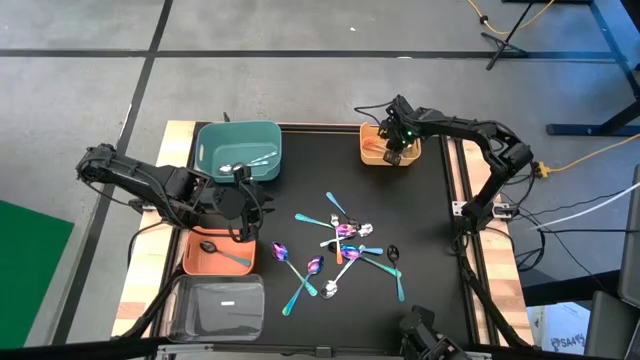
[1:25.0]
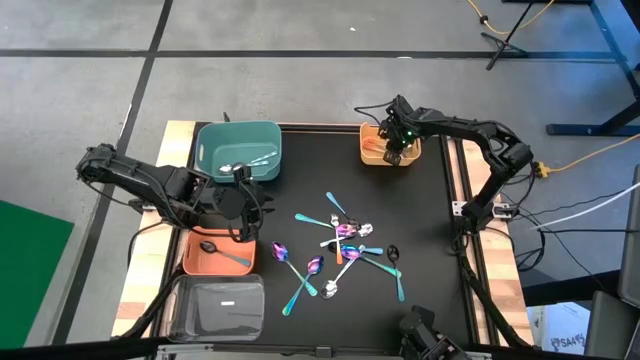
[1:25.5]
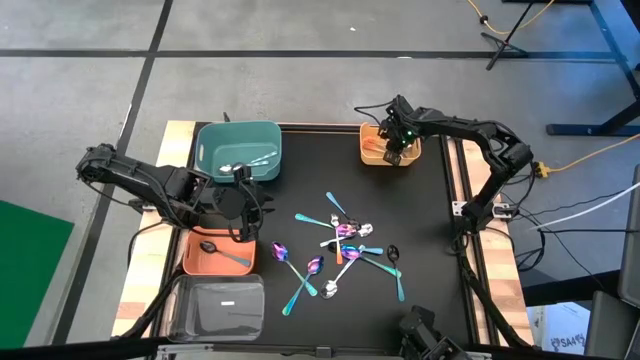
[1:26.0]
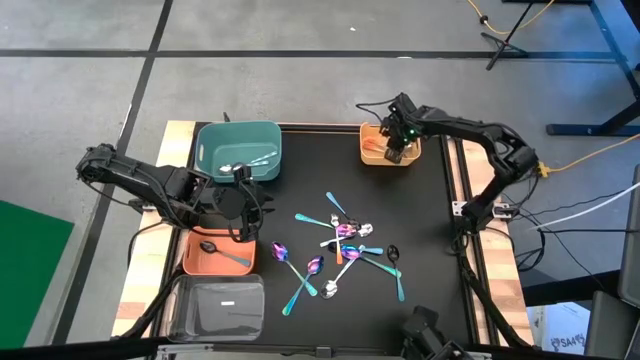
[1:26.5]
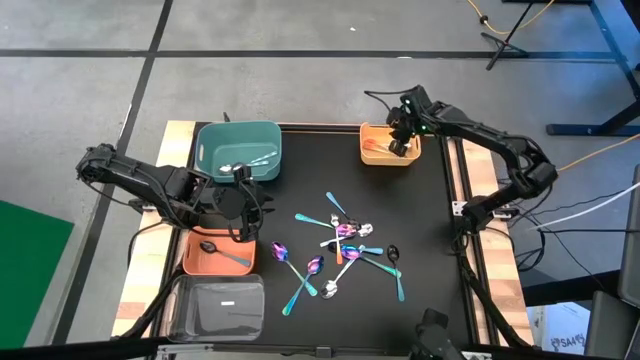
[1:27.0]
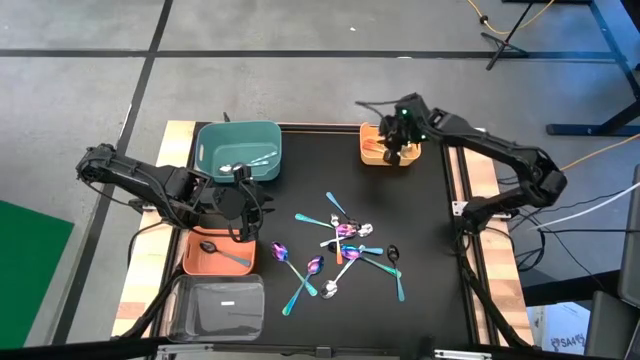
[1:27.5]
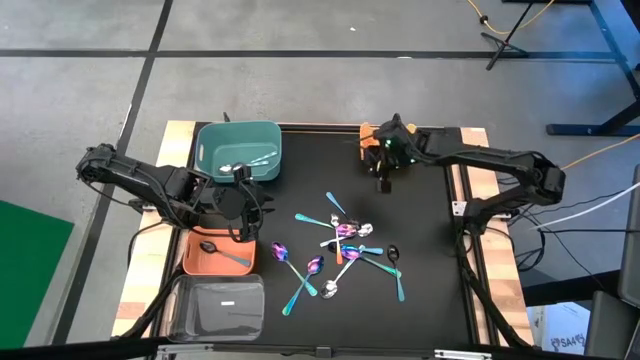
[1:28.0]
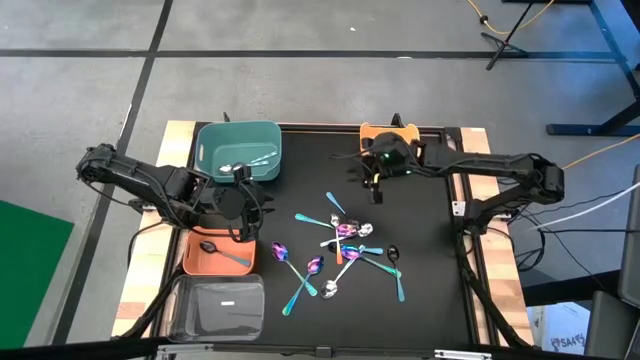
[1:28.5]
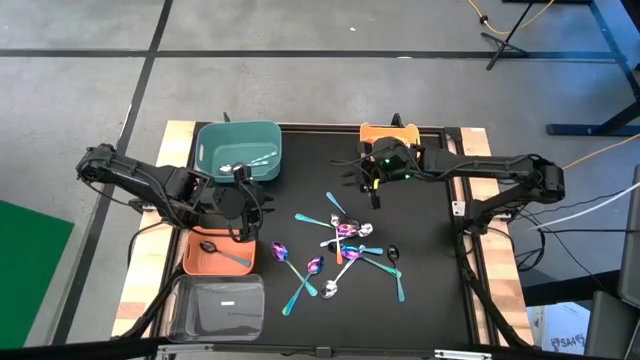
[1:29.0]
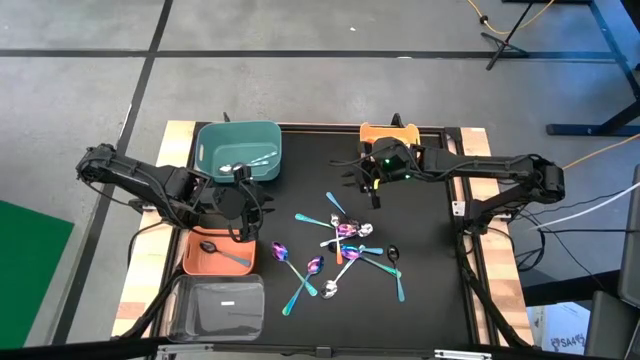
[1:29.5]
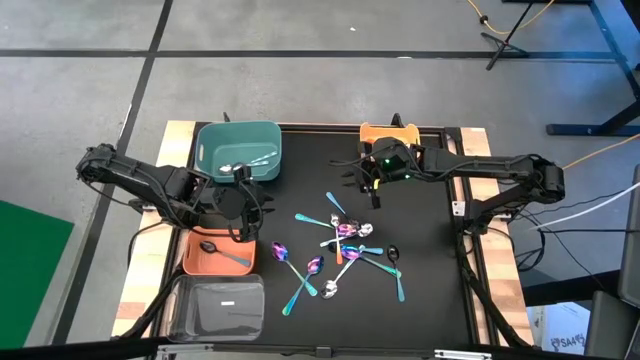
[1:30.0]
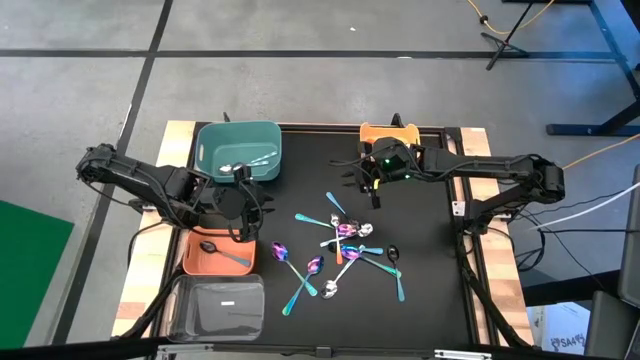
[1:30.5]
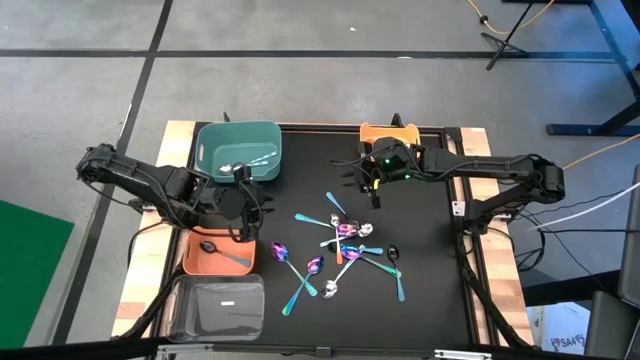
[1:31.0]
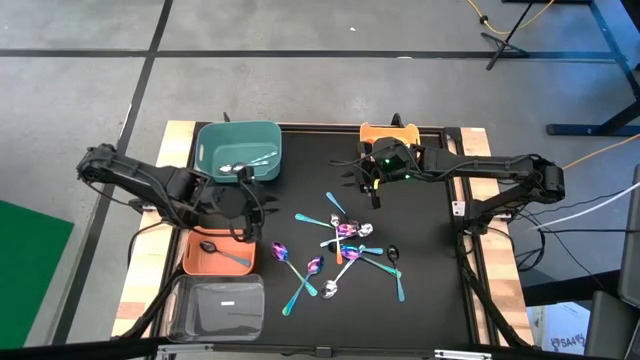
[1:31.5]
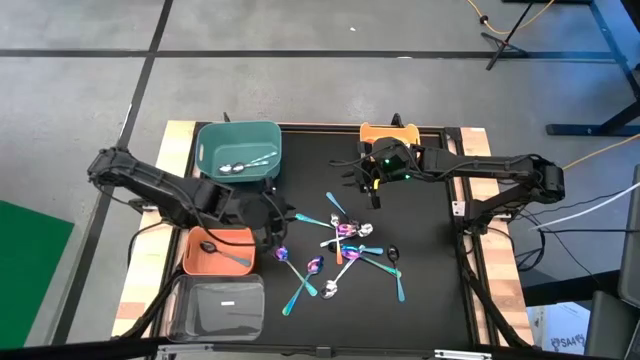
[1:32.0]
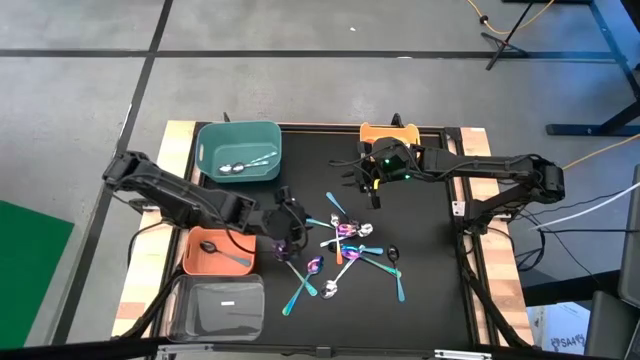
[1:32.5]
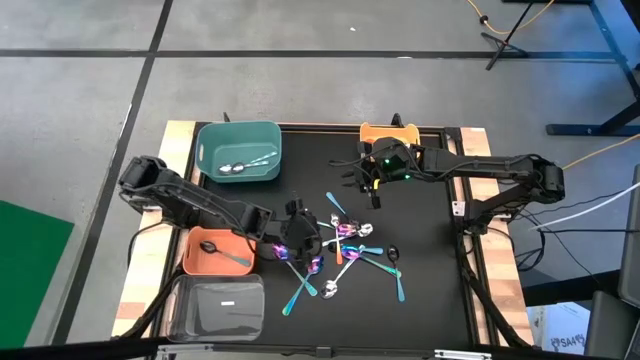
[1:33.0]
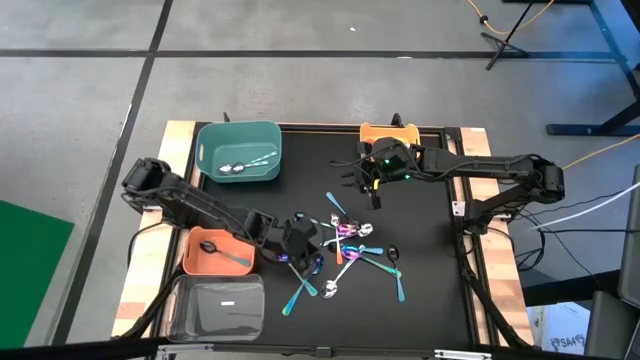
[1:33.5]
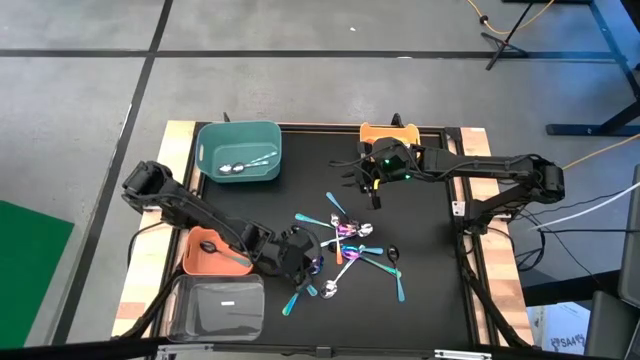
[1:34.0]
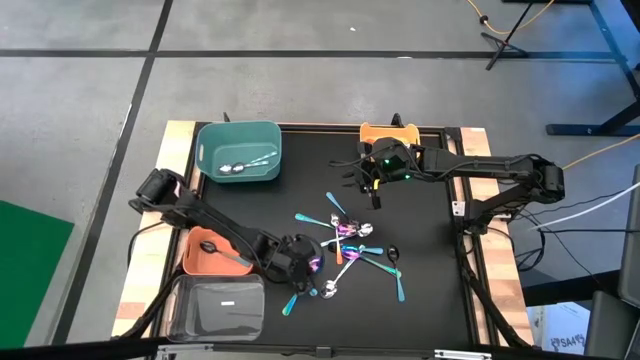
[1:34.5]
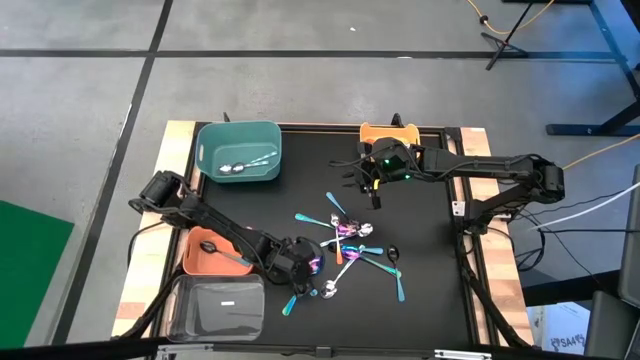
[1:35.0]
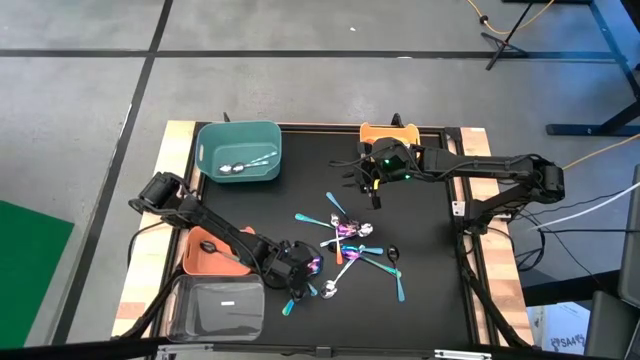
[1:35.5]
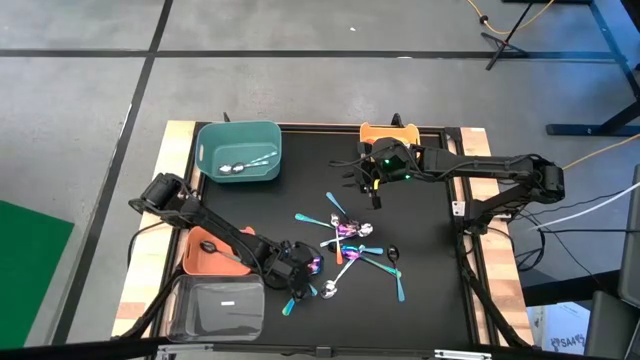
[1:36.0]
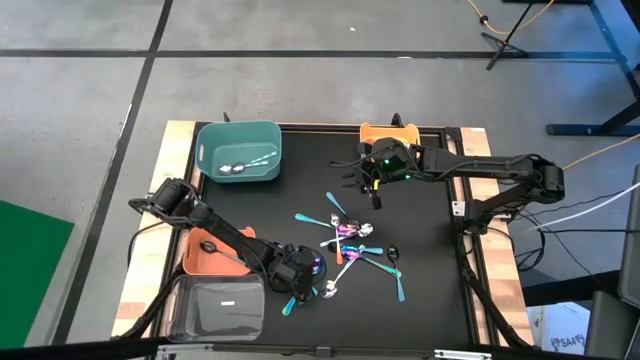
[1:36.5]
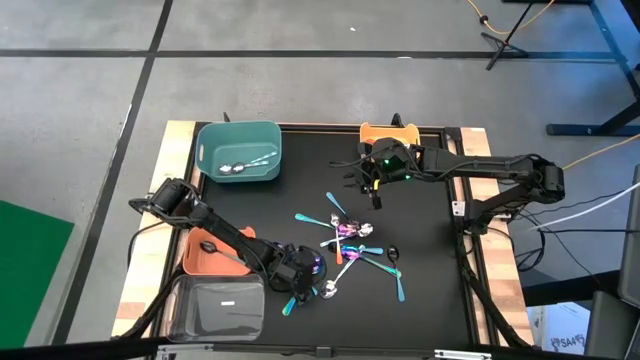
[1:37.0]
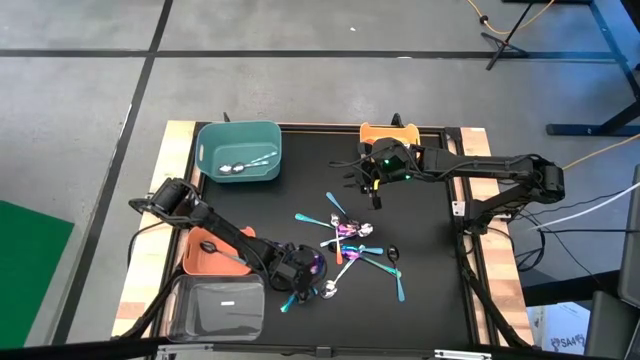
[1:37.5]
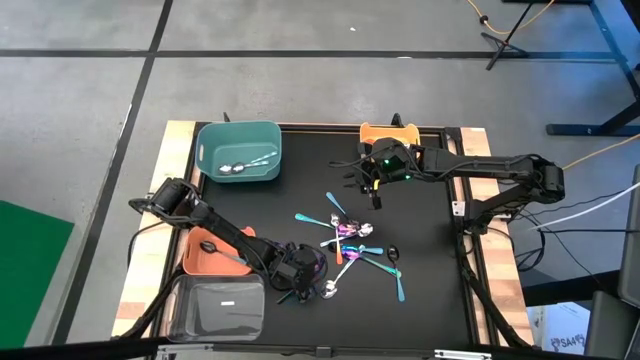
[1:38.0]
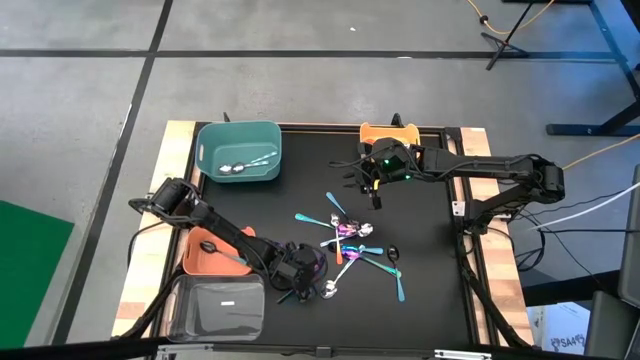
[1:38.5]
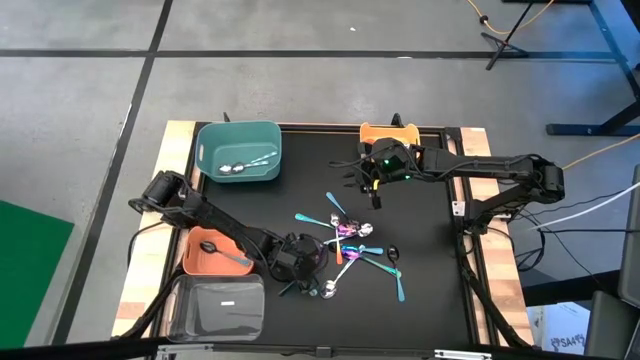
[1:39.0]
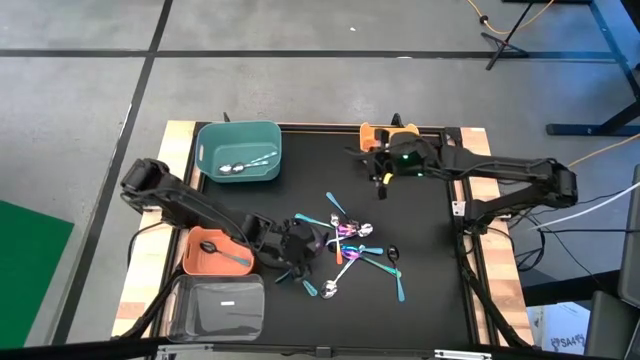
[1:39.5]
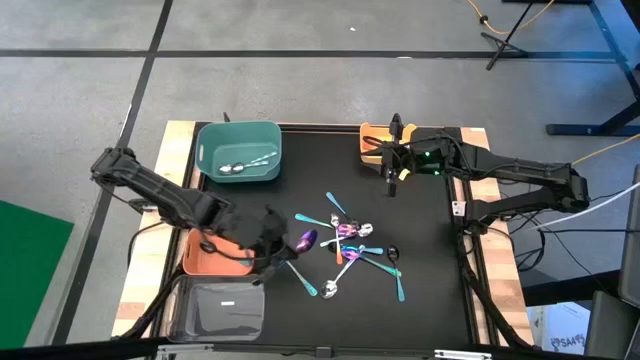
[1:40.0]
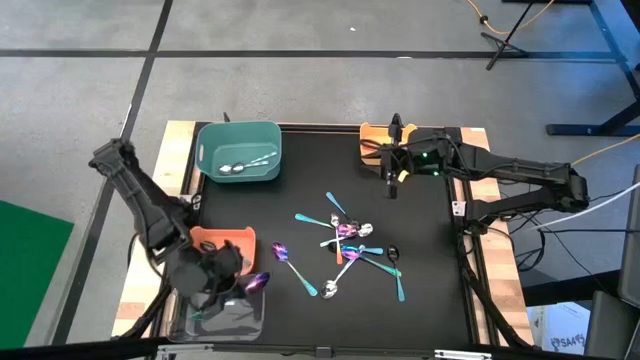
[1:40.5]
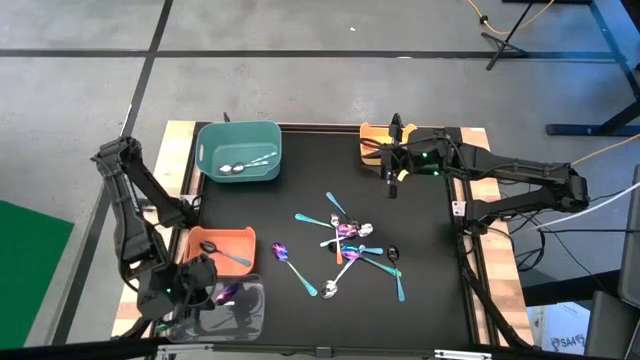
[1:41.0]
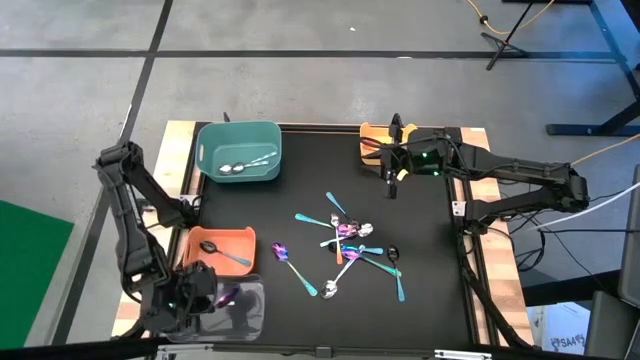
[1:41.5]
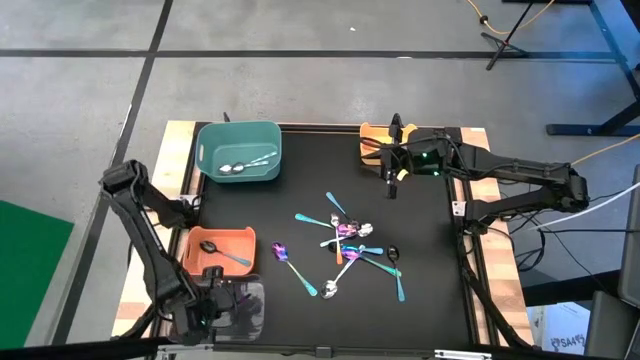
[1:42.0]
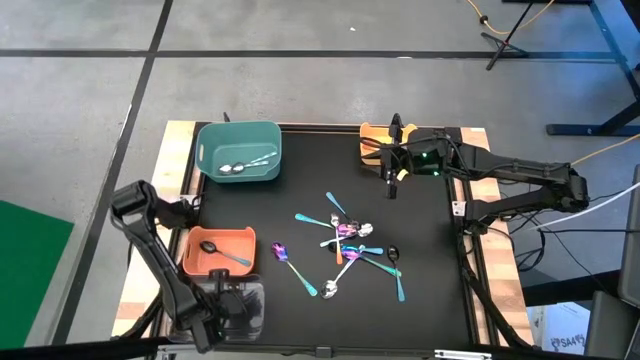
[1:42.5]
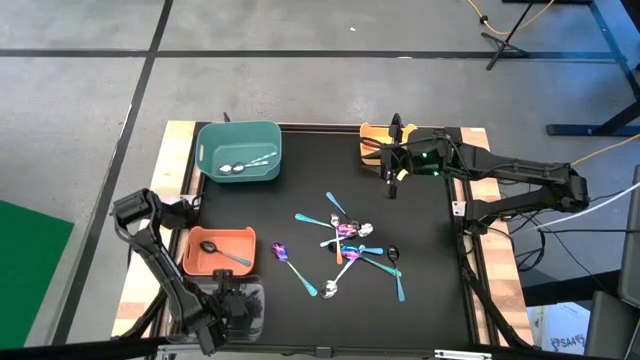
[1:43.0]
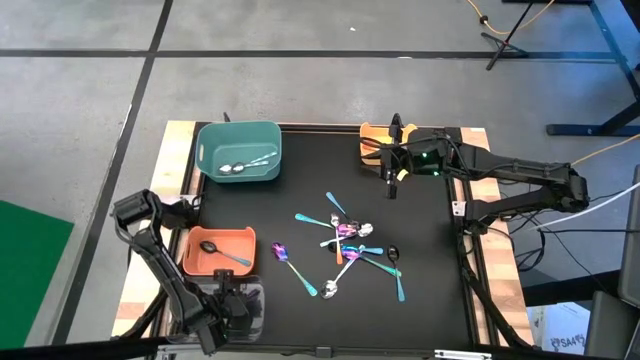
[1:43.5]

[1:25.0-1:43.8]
Task: Sort silverware by color (type)
Put the violet spoon into the transparent bin

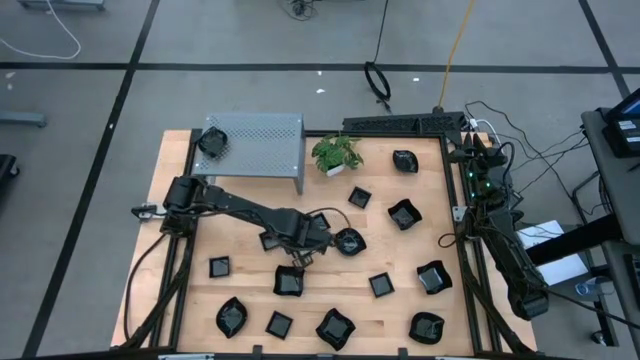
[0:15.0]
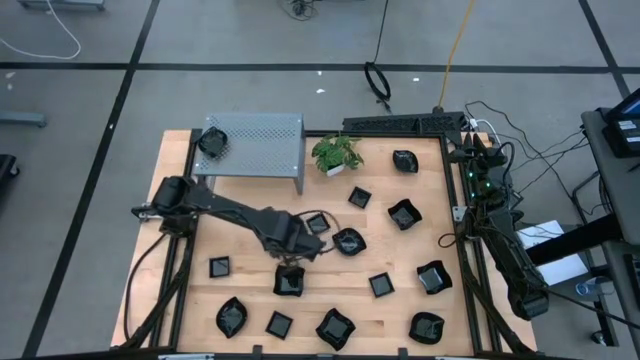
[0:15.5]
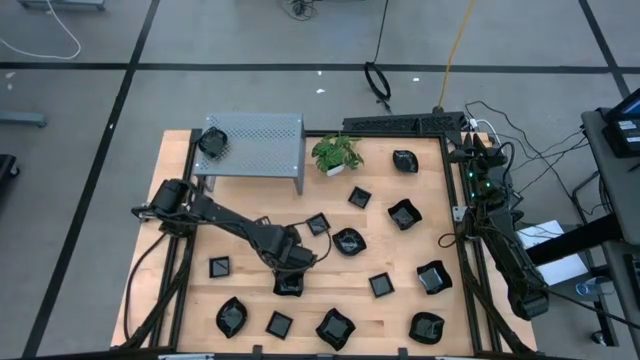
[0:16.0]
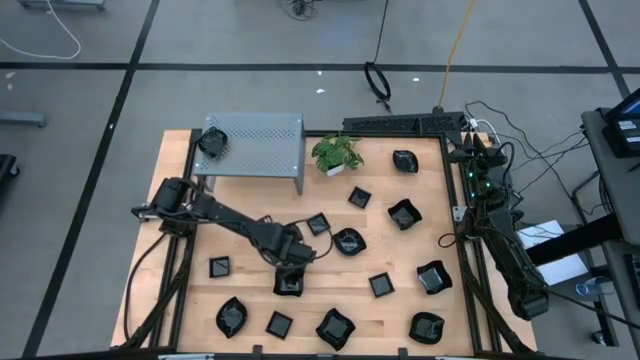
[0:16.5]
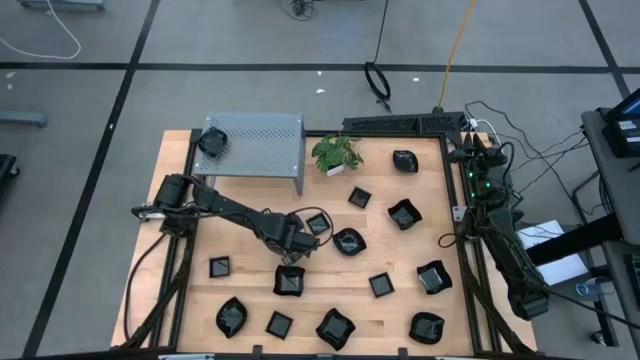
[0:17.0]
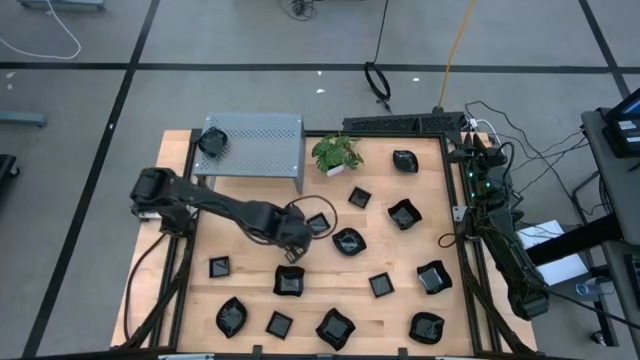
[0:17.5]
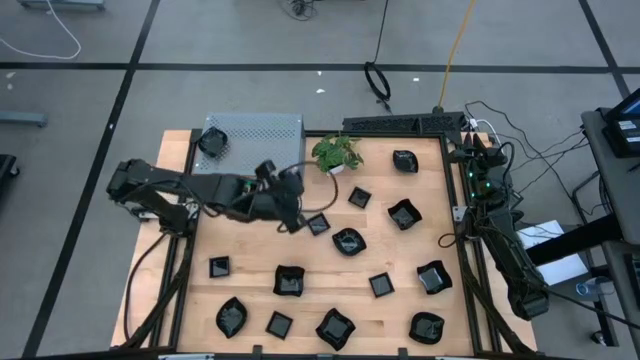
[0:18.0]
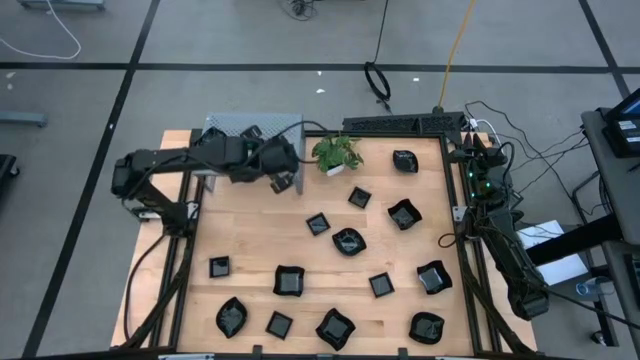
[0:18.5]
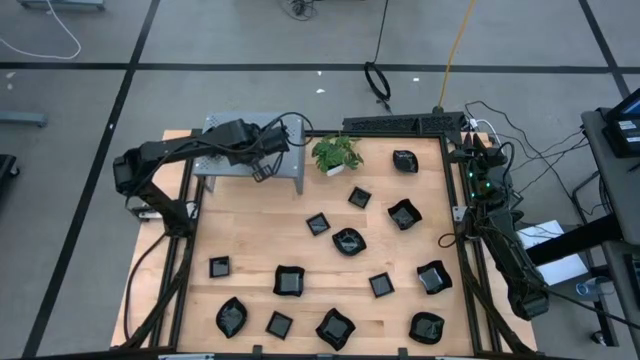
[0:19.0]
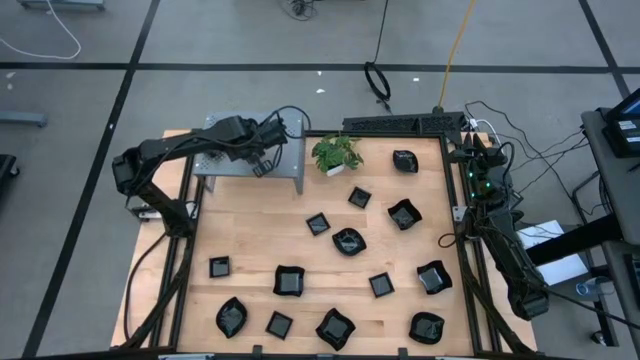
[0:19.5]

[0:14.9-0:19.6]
Task: Pick & Place Mini shaped plates
Put the black square plate on the shelf
